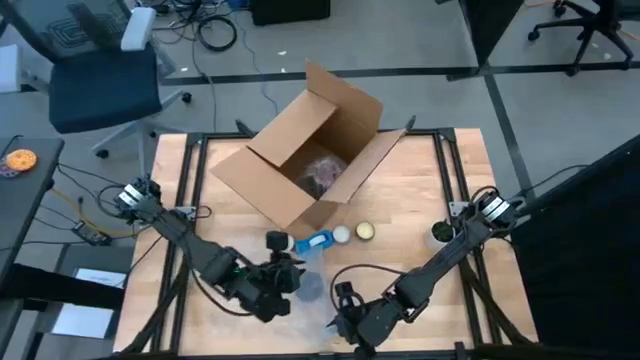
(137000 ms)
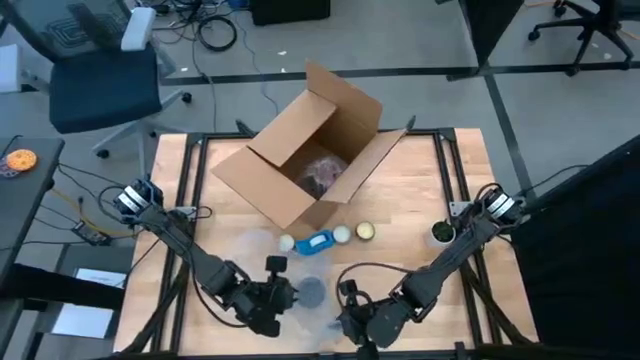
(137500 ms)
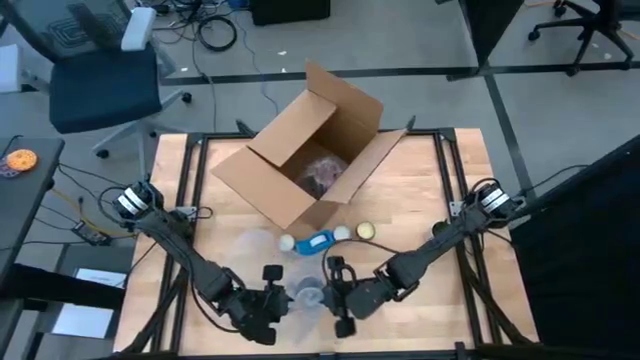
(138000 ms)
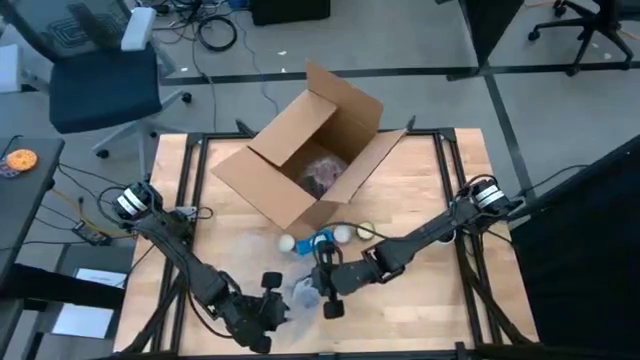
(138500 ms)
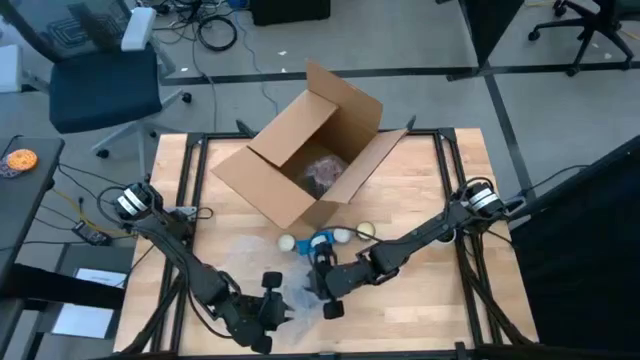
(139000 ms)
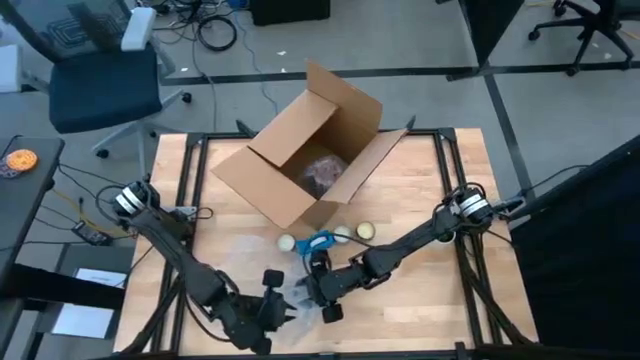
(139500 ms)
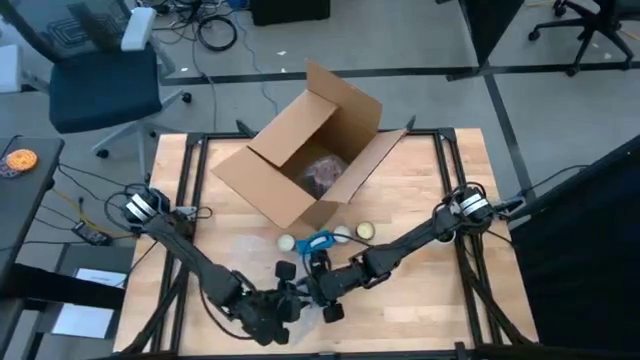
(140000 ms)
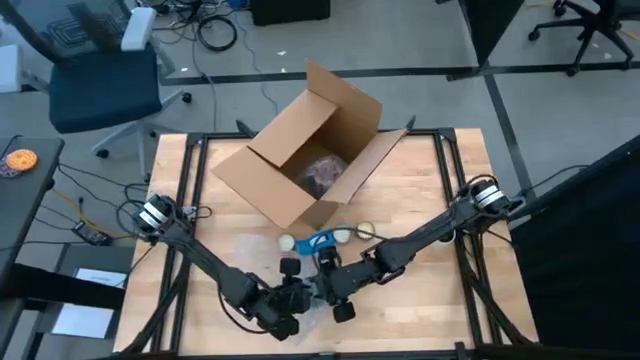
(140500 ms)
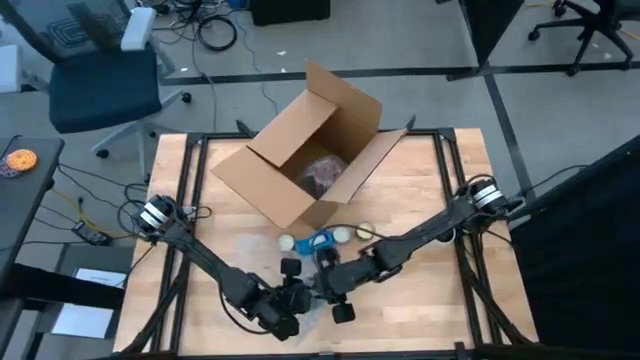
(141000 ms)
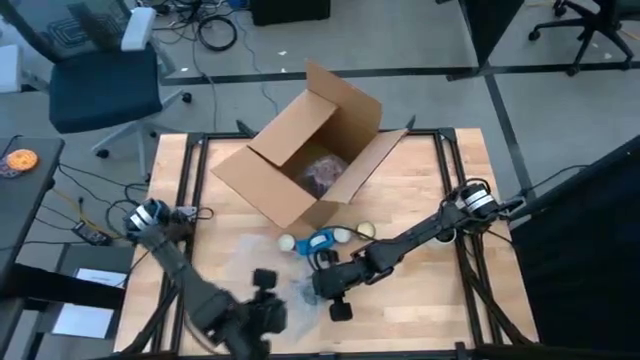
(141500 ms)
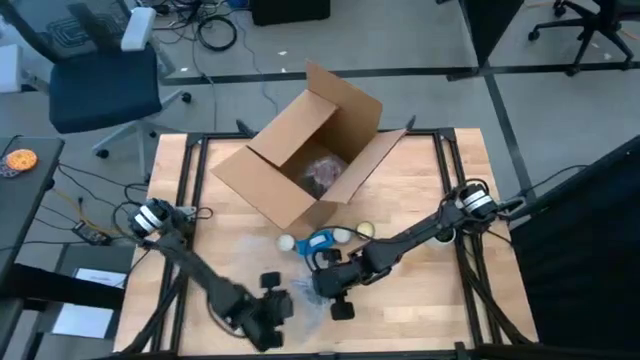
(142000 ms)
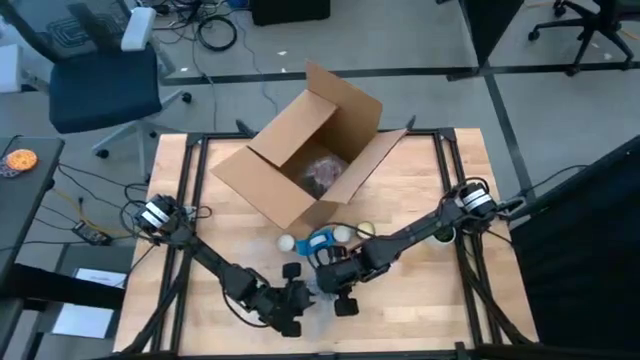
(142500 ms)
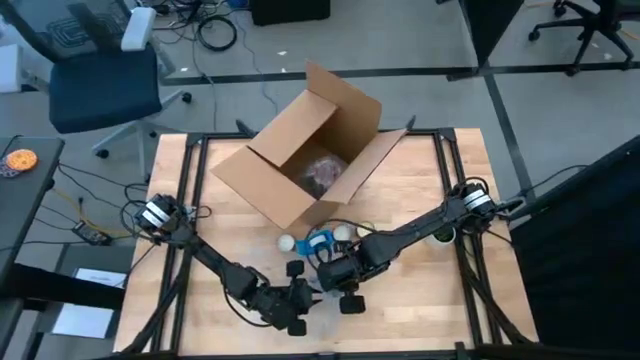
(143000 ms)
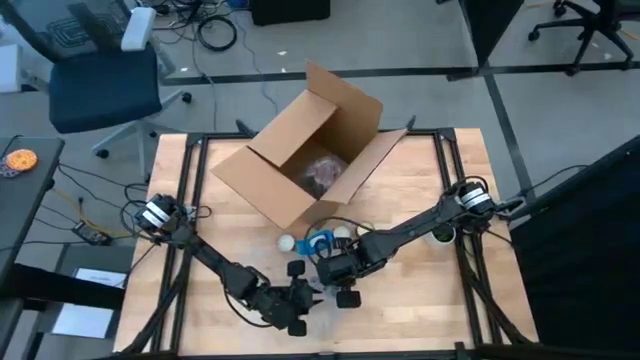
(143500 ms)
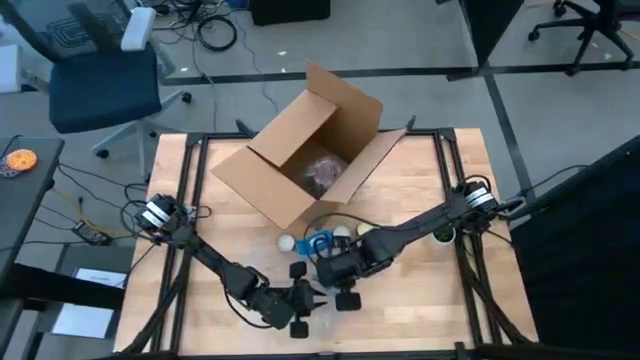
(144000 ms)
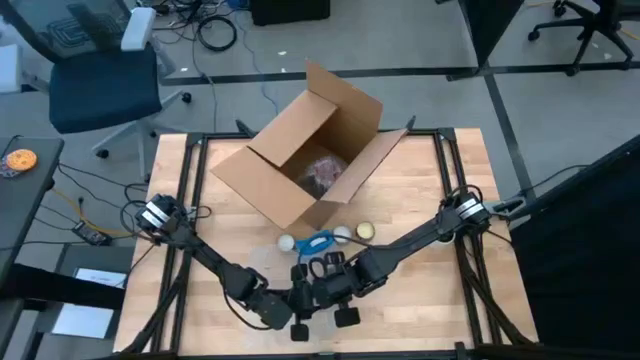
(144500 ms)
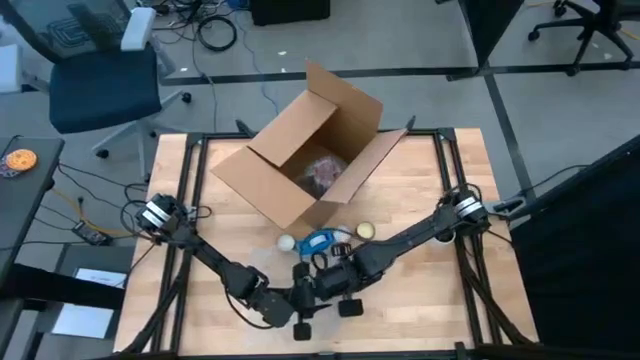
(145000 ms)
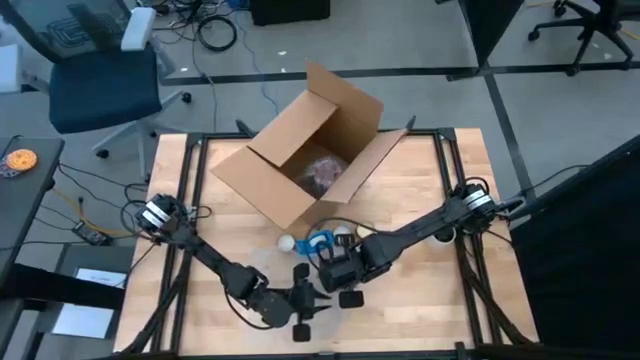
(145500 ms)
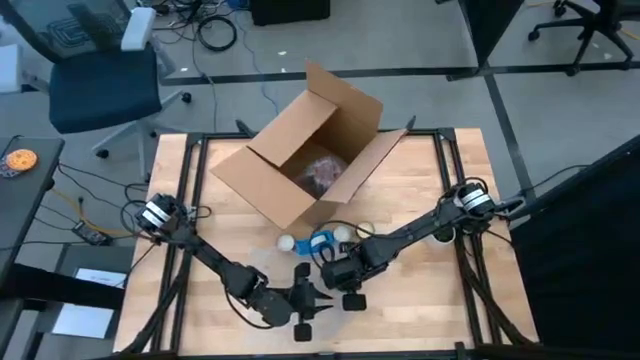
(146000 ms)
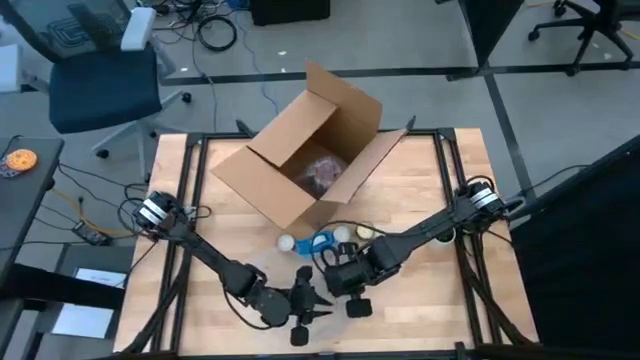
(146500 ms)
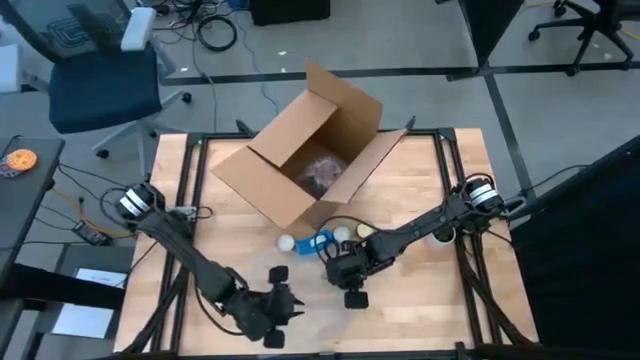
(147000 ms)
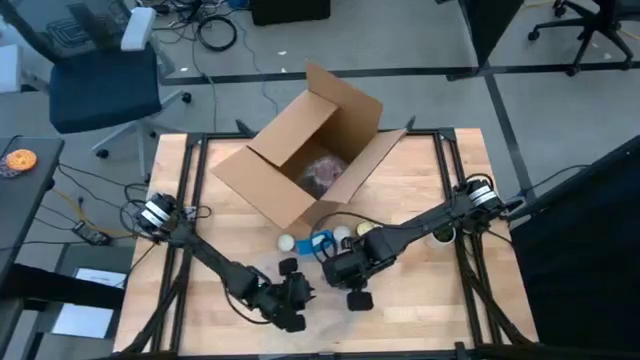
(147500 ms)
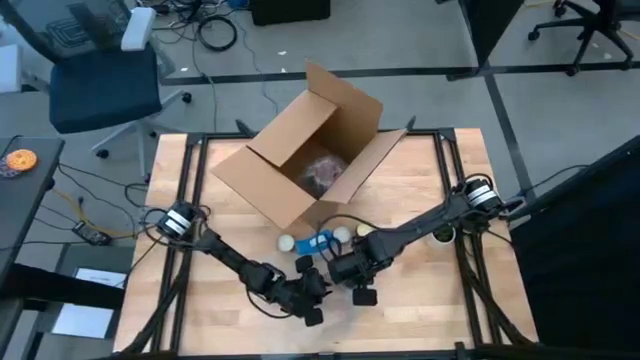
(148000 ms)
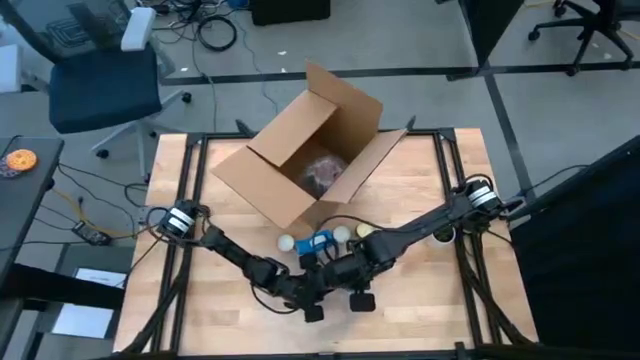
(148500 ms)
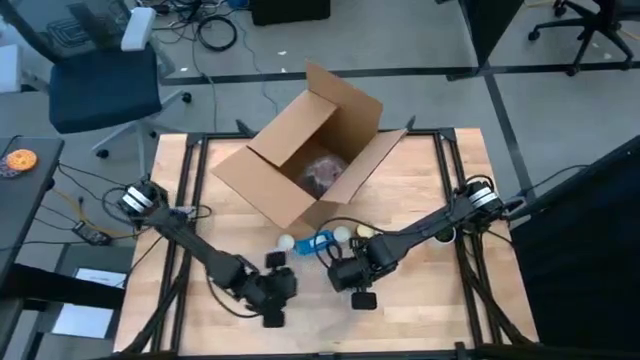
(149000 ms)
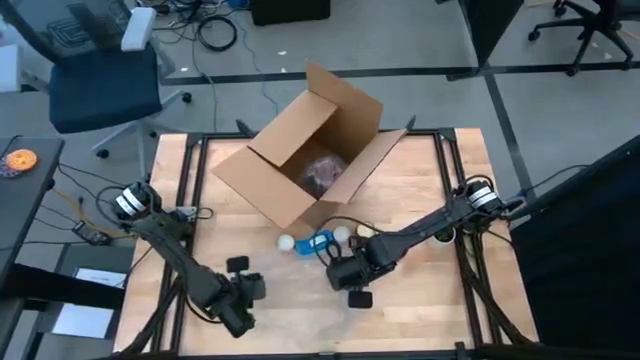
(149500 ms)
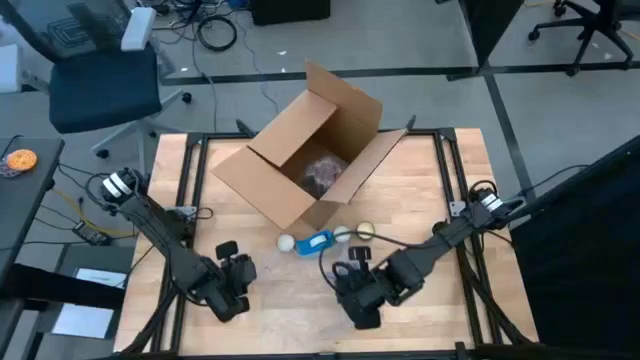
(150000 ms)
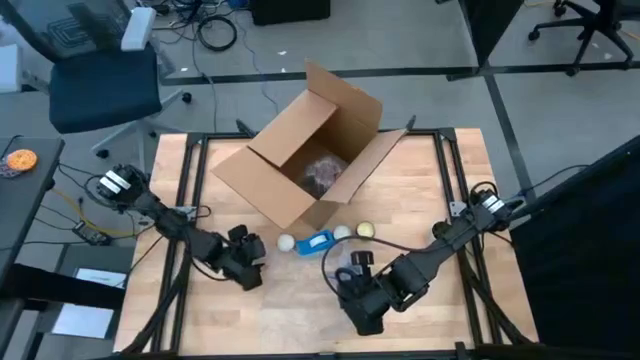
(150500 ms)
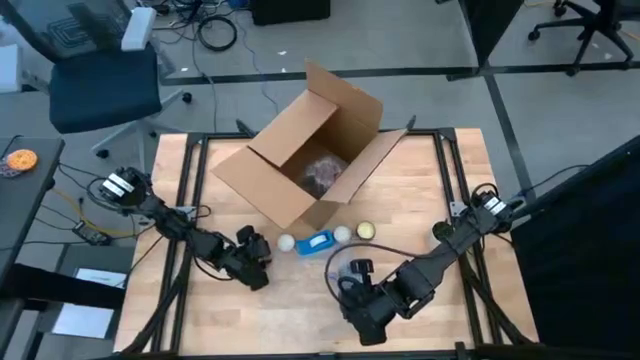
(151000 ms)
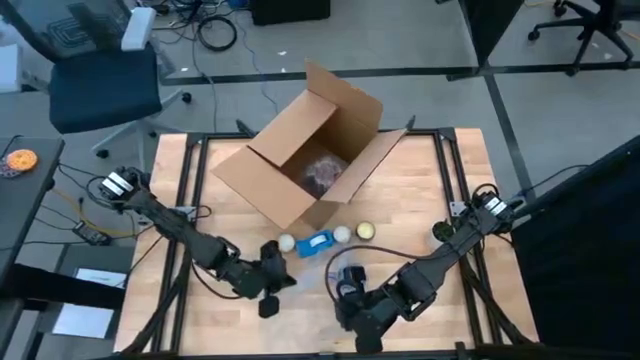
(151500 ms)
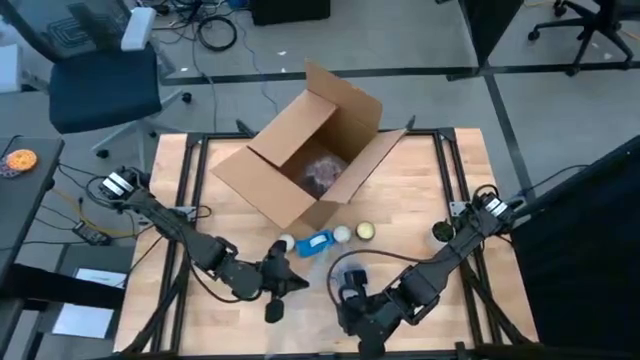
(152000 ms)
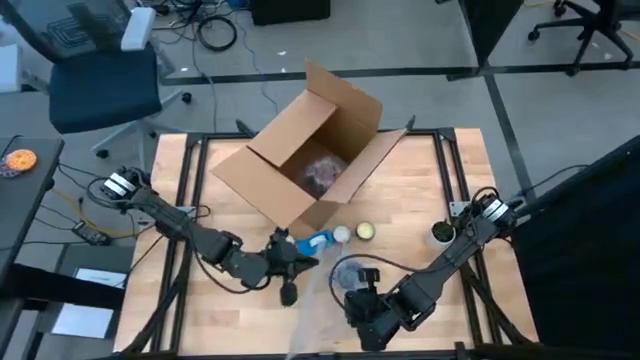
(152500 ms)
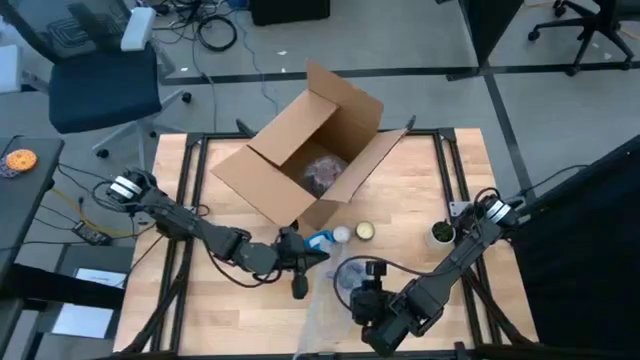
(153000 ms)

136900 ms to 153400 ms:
Task: wrap mug
Wrap the purple mug with the bubble wrap

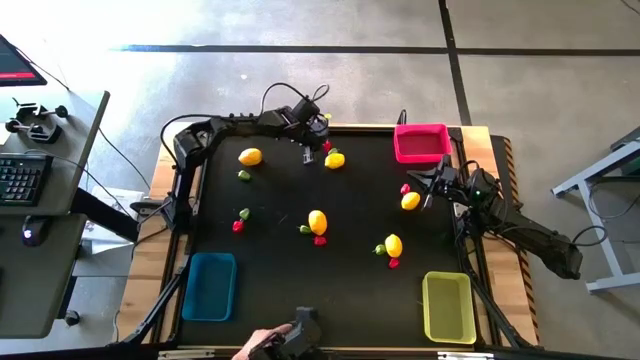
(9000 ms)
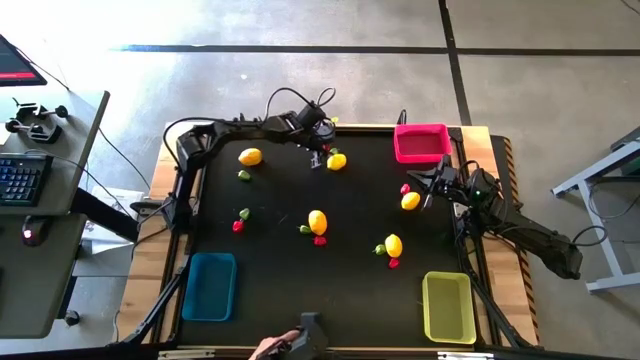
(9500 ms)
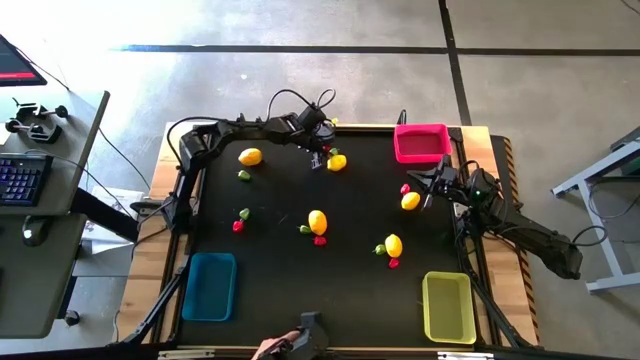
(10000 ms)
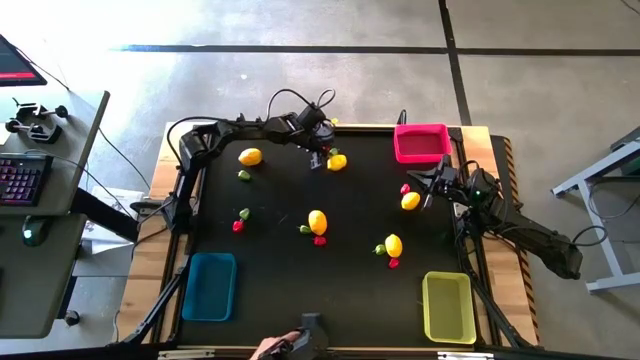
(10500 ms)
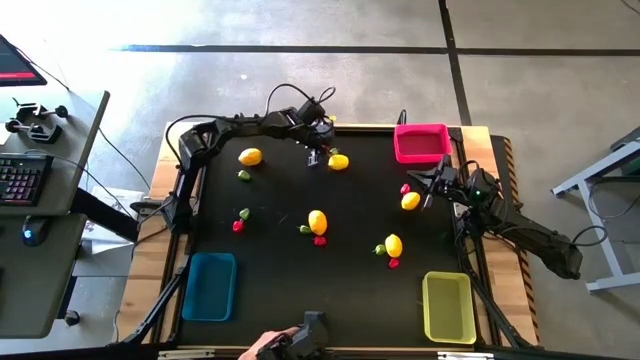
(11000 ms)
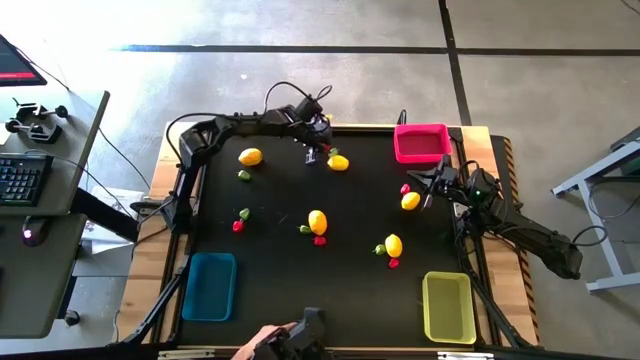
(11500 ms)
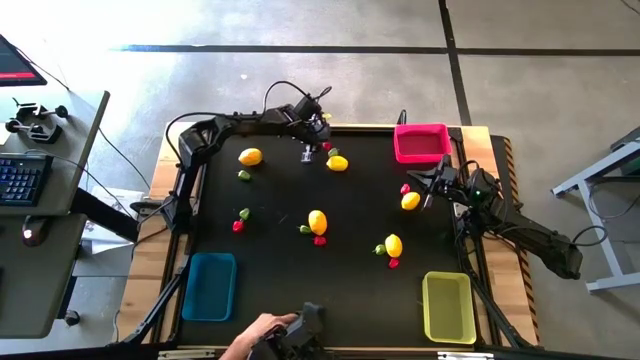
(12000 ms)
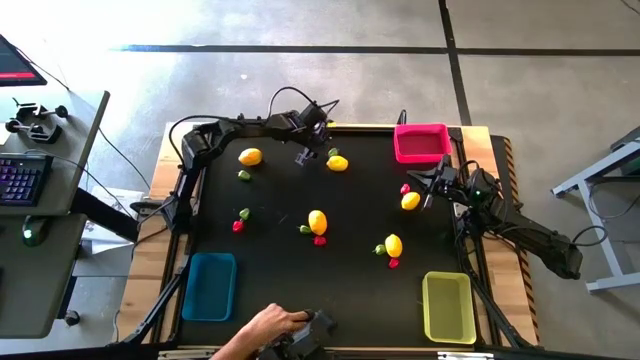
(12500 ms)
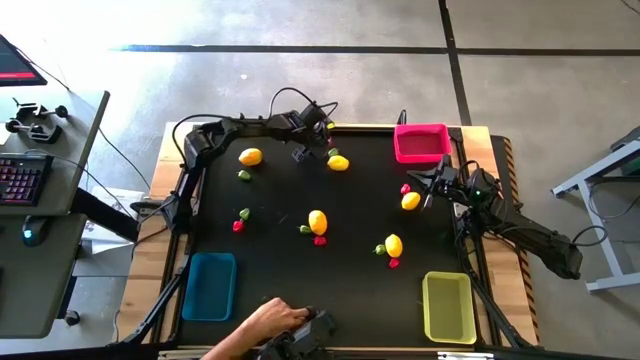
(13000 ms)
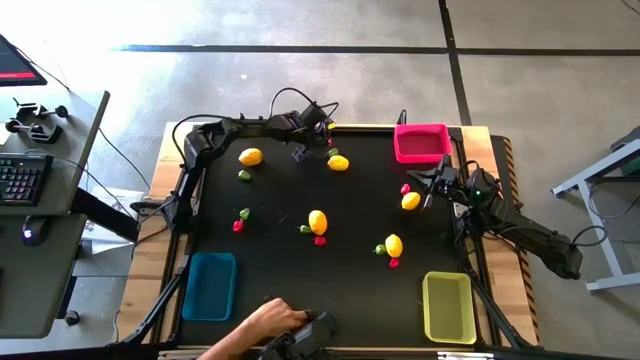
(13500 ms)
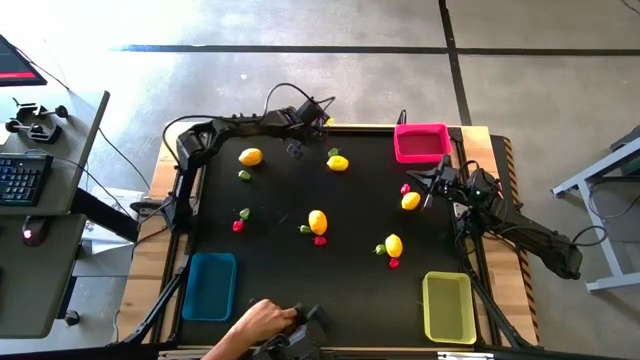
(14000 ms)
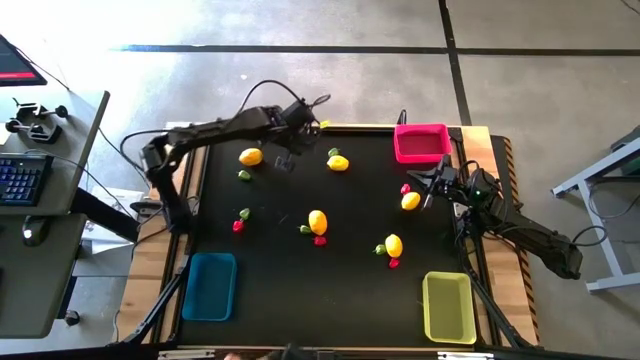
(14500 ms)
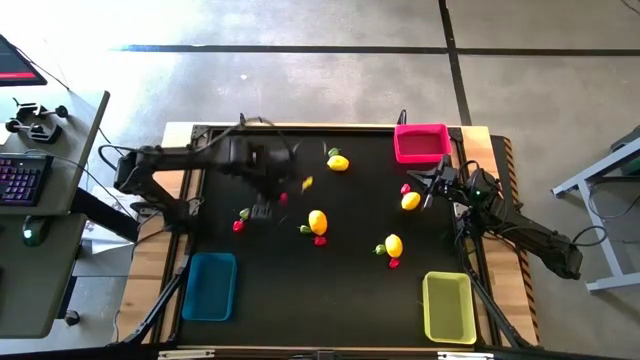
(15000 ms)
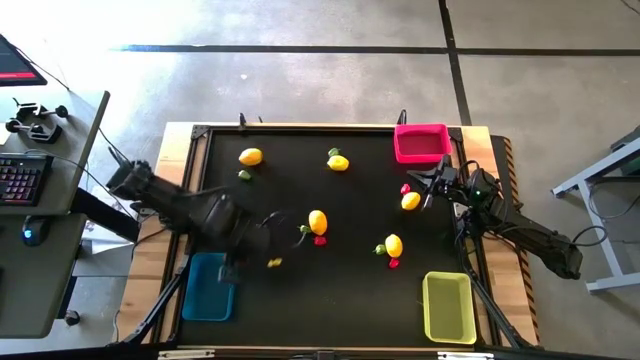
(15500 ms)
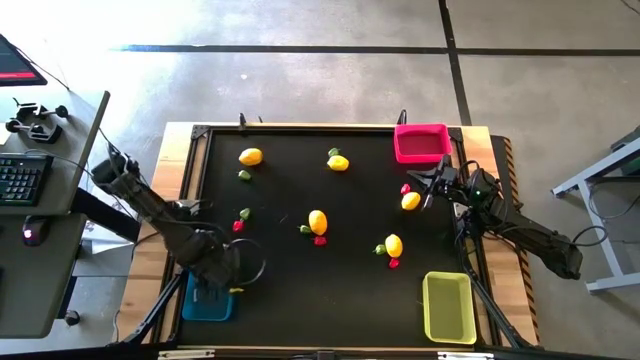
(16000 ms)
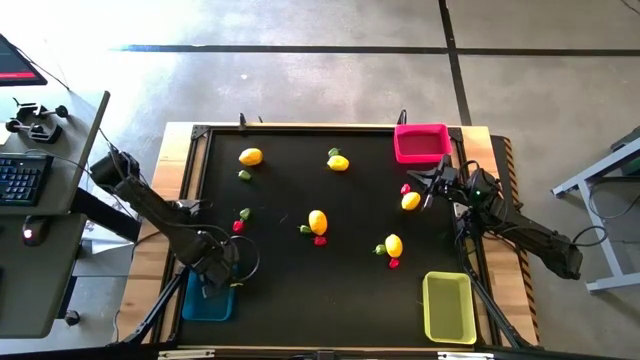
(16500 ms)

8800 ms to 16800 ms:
Task: Sort produce into baskets
Put the red chilli pepper into the blue bin
